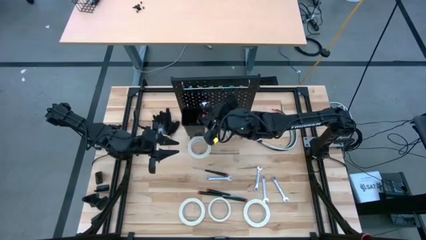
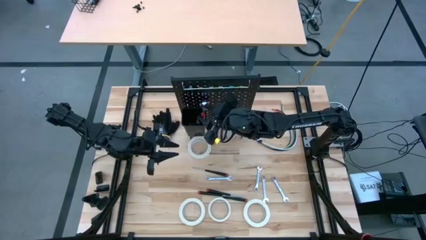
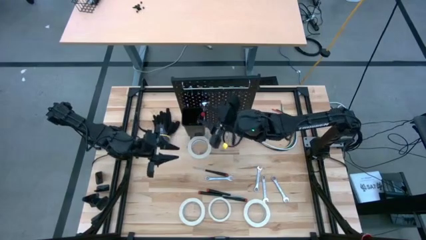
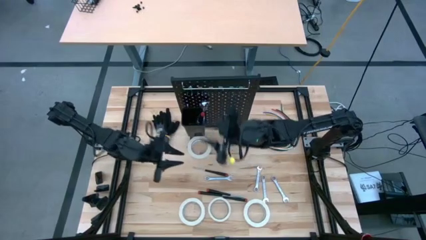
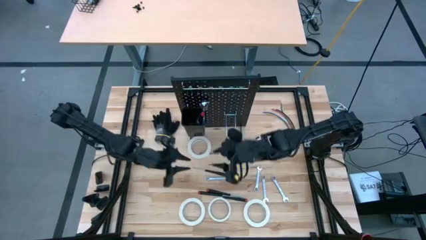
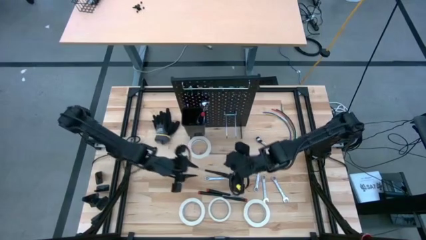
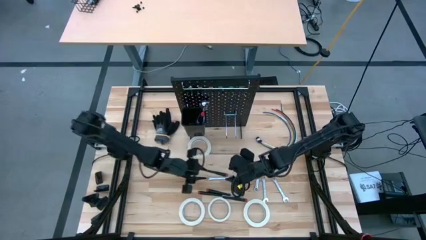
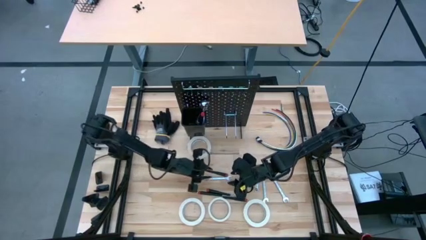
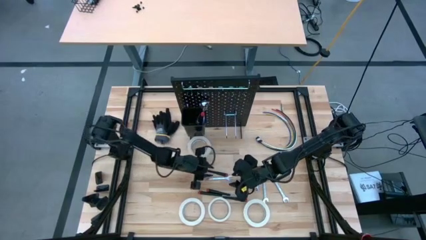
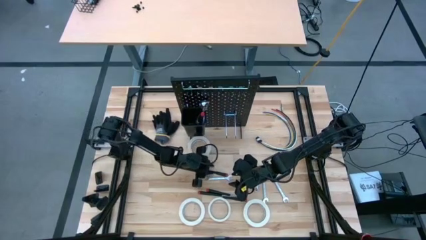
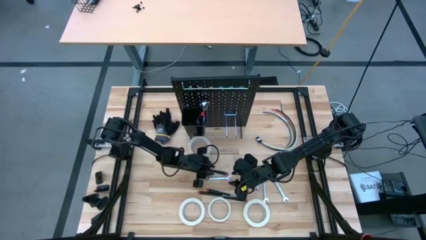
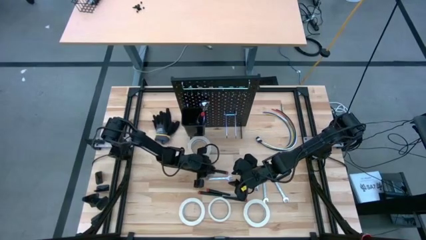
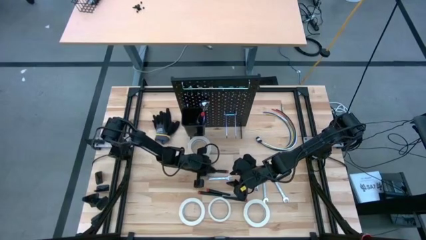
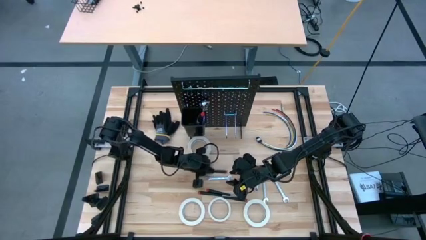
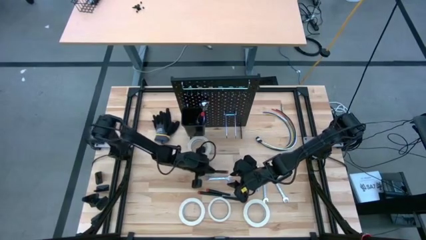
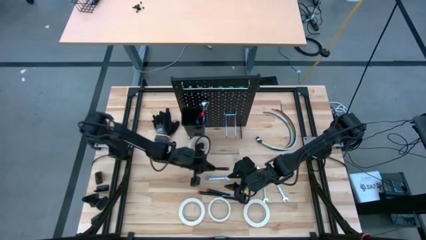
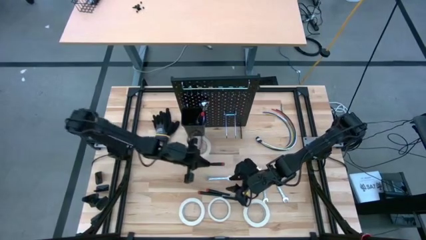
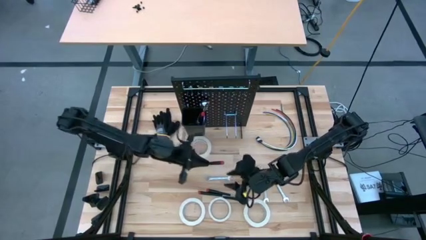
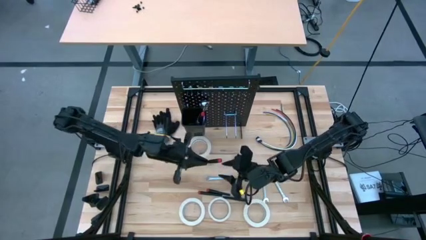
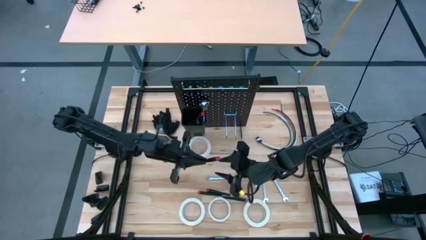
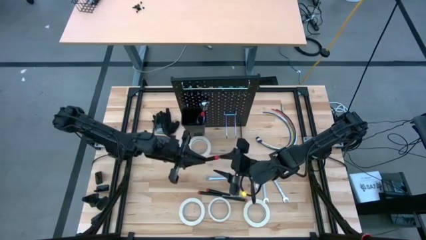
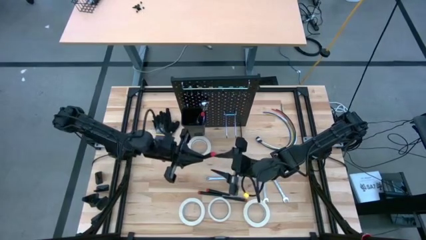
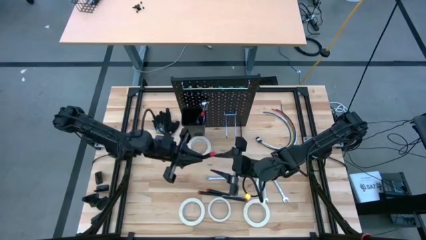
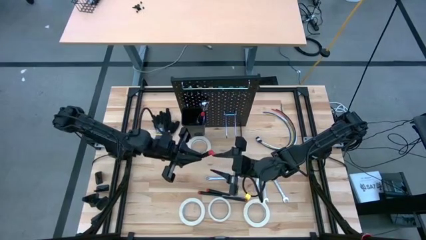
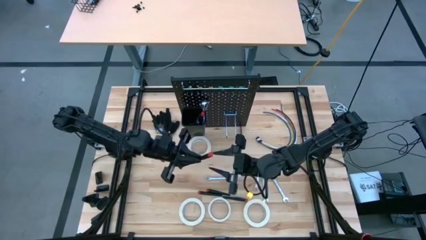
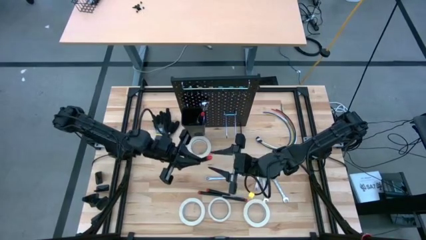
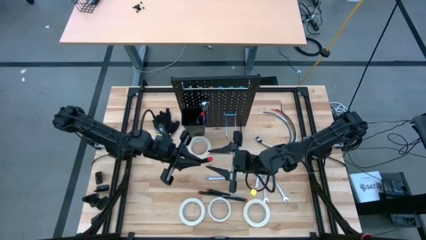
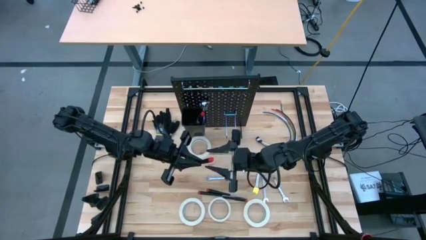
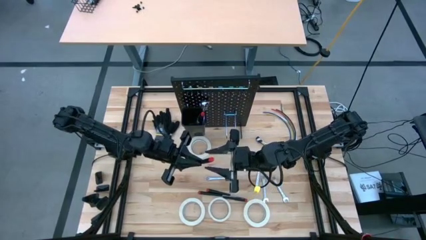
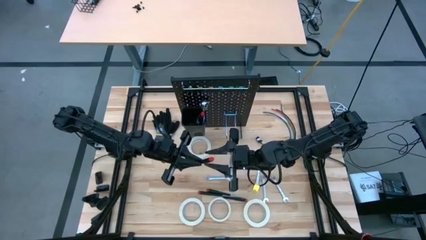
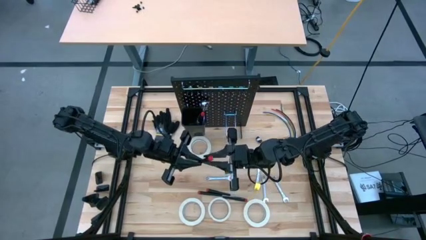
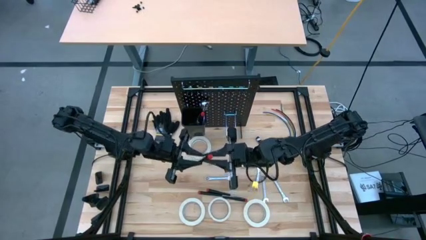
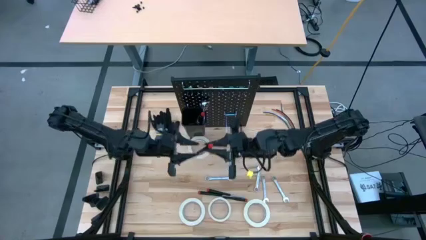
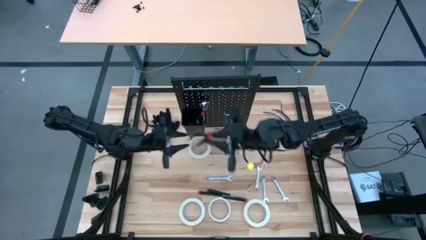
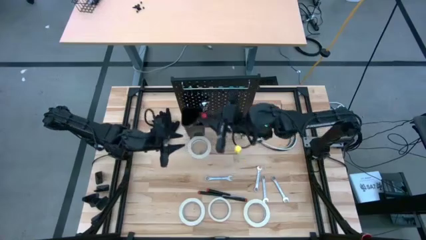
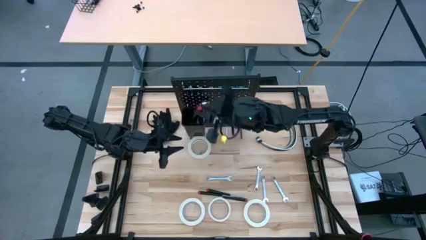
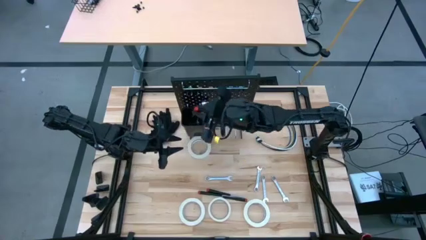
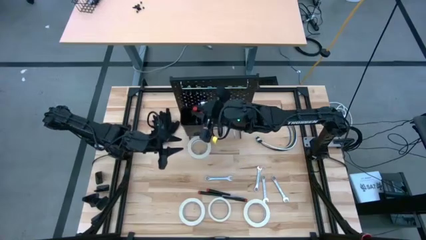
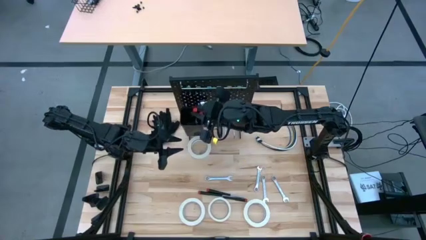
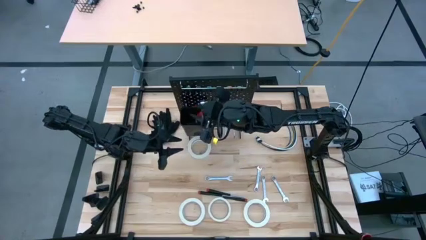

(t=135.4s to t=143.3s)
Task: Hang tools onto peg board
Put the black nut driver into the black bin on the peg board

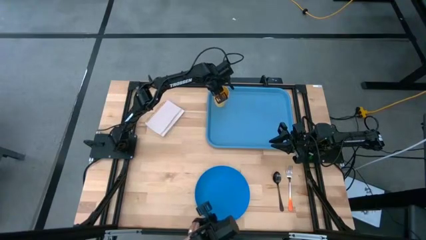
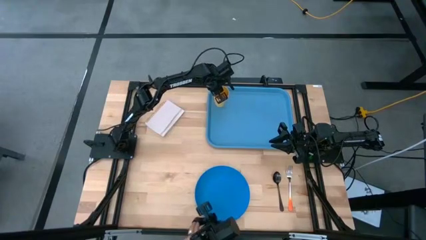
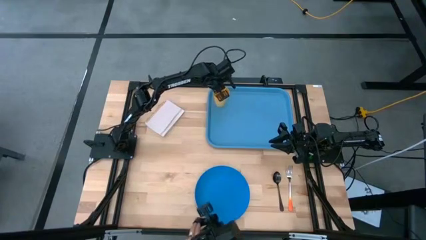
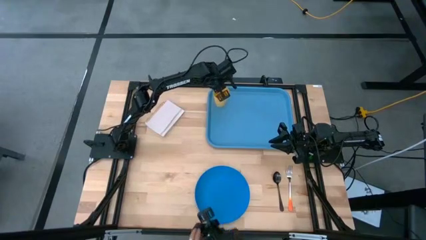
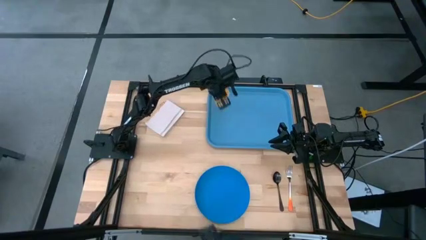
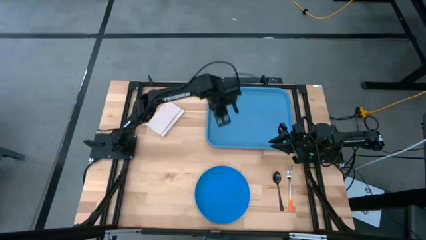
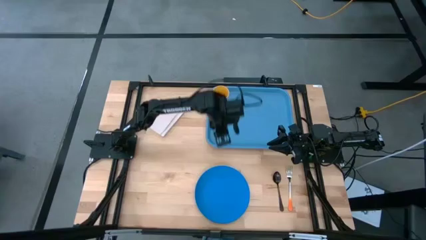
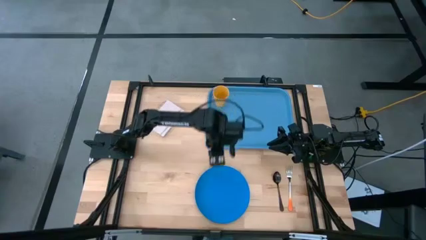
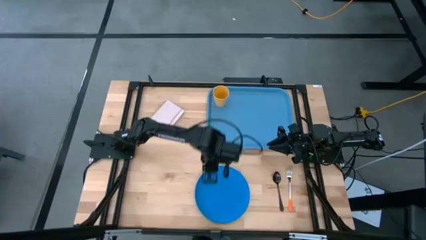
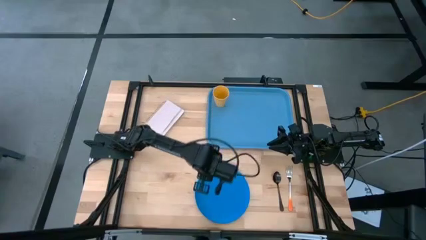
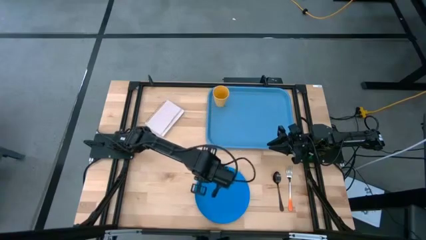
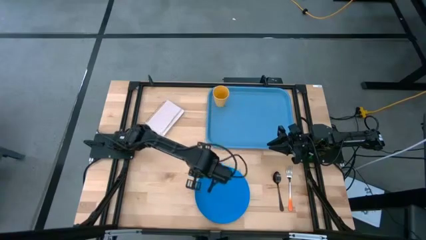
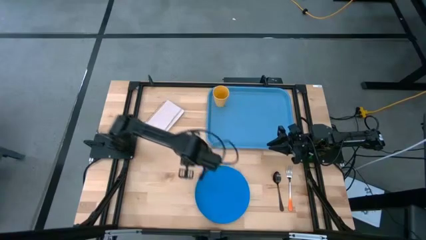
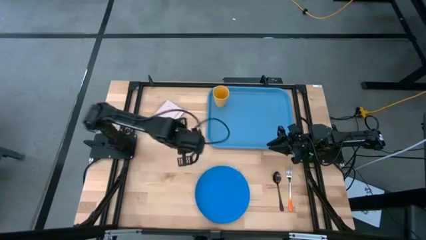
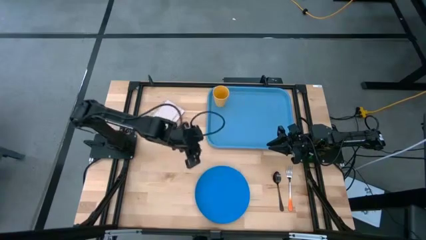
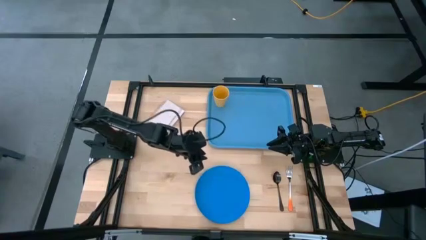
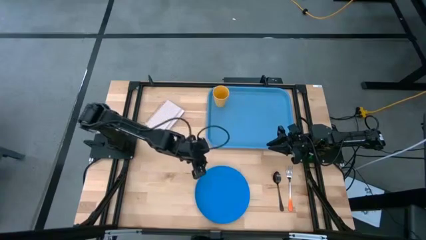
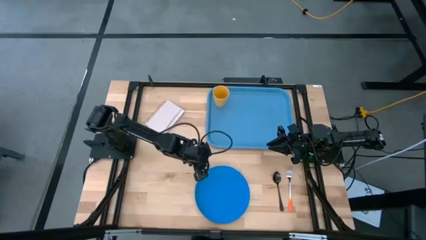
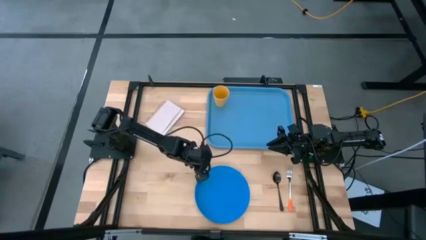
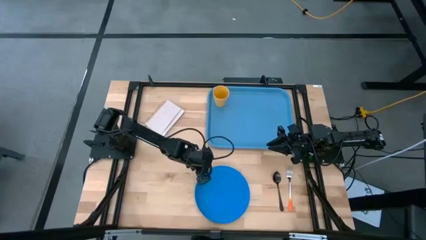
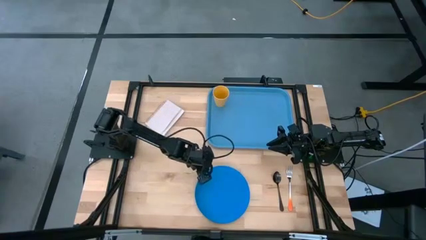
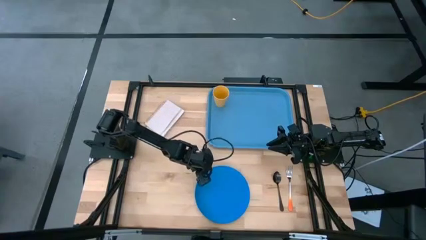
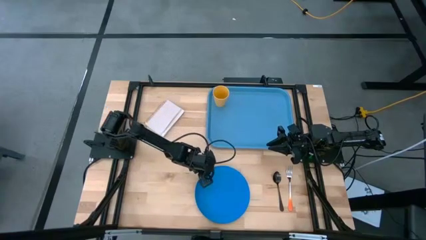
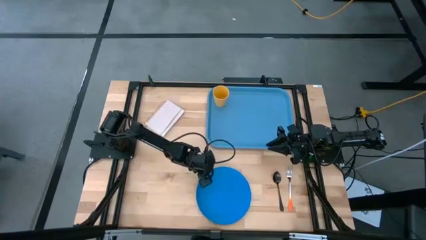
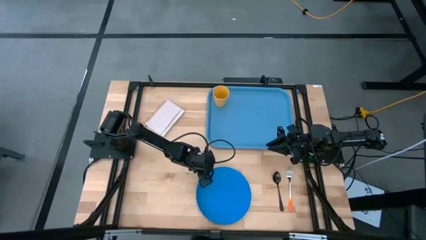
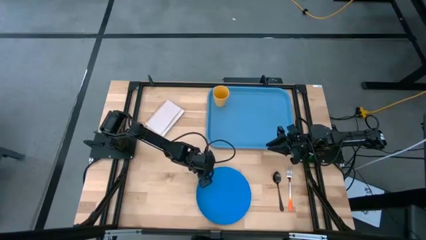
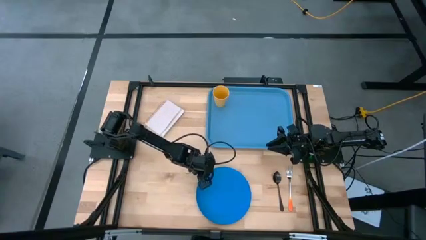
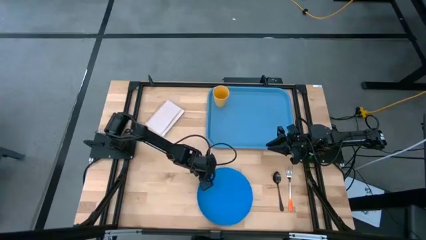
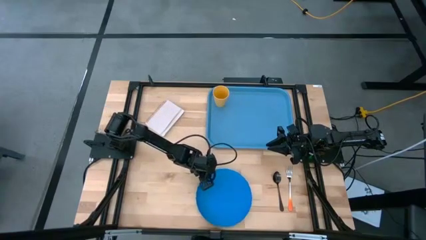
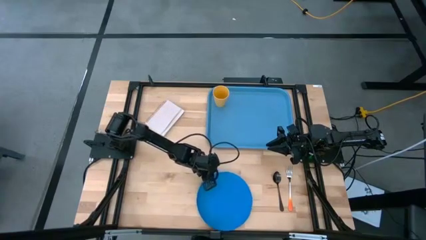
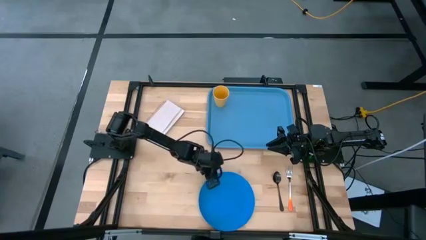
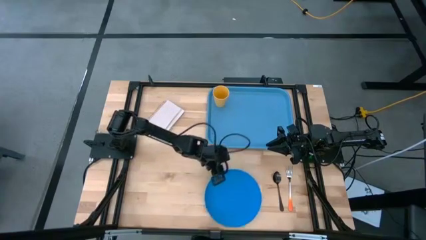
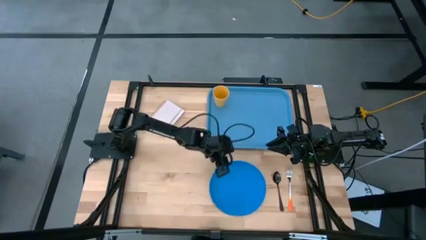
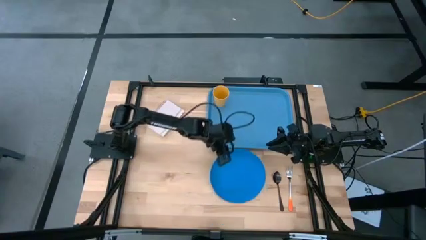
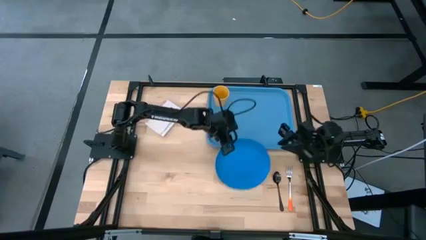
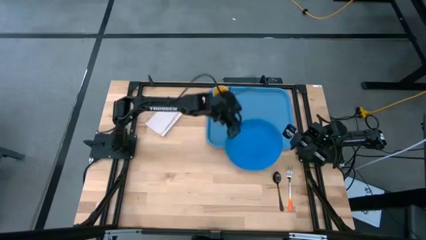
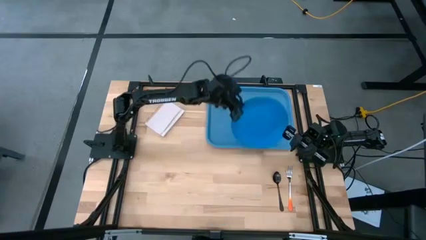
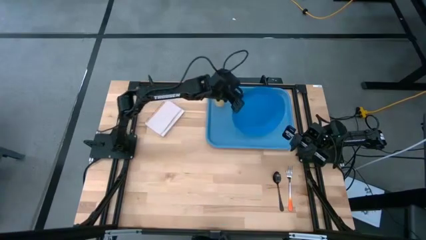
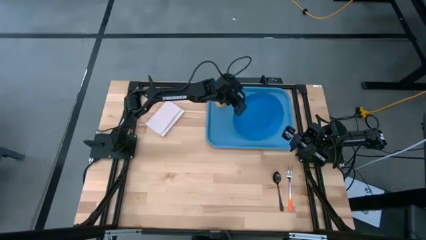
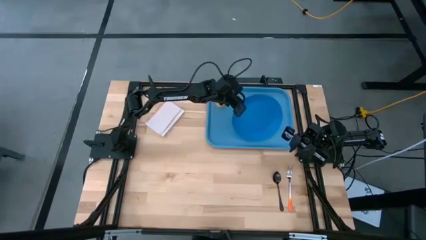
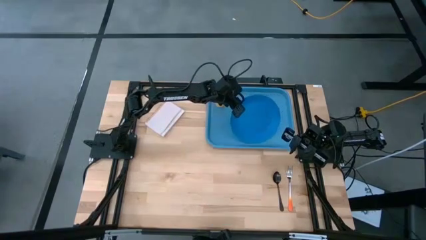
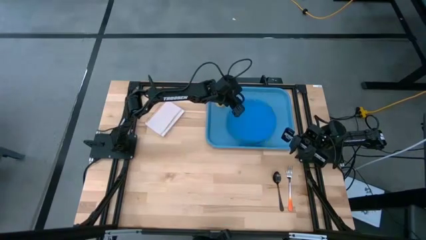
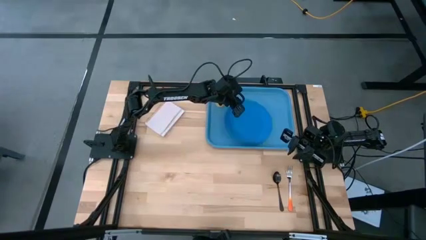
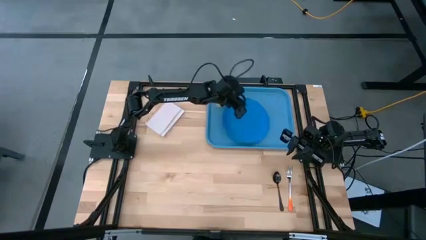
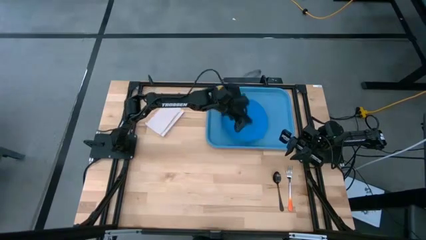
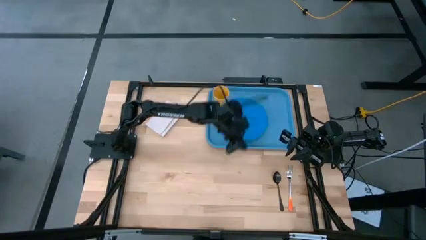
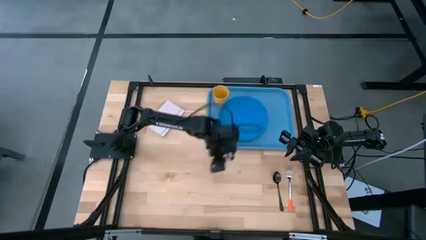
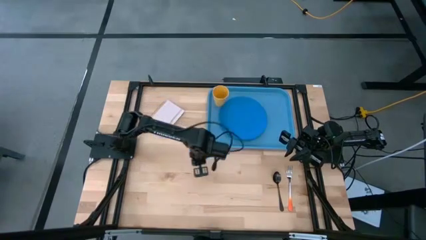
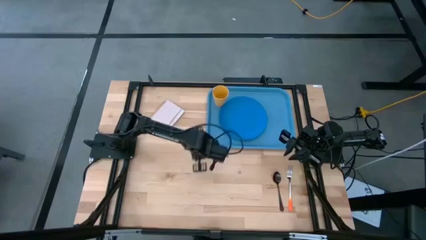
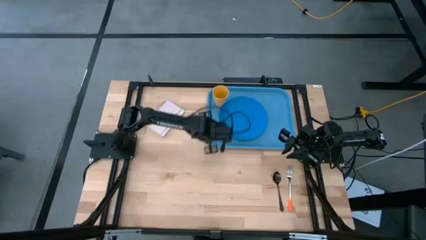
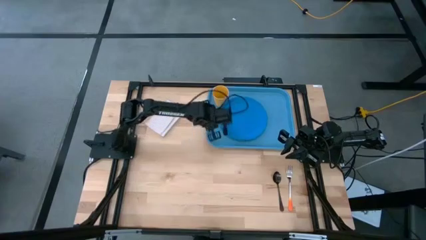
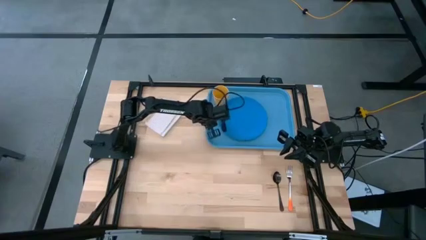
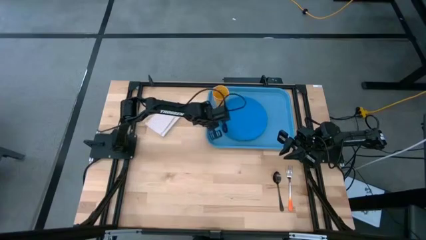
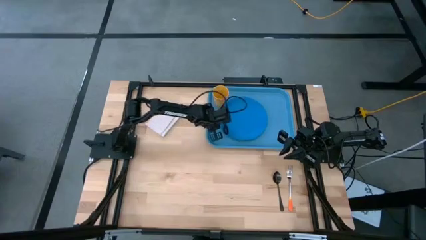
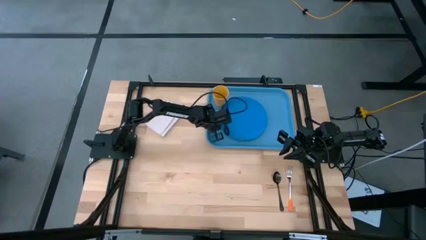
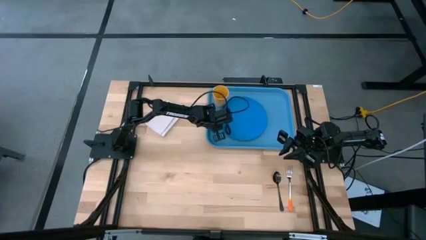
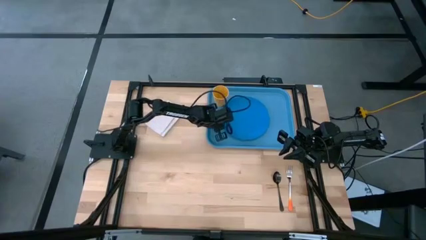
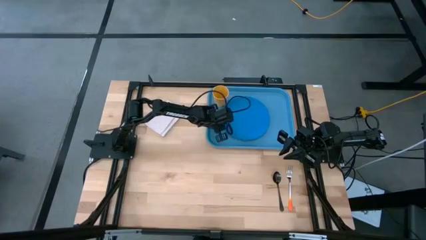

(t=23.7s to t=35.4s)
Task: Pick and place plate/cup/fork/spoon on tray
Put the blue plate on the tray to the right side of the yellow cup
